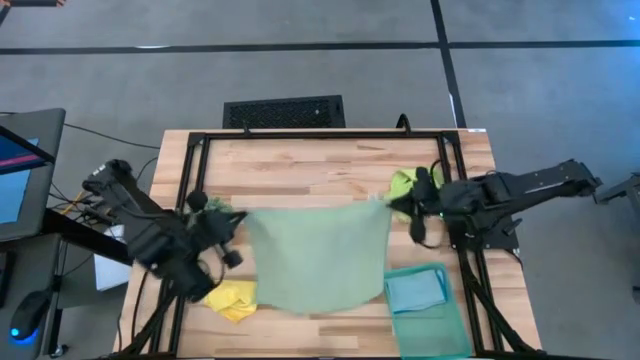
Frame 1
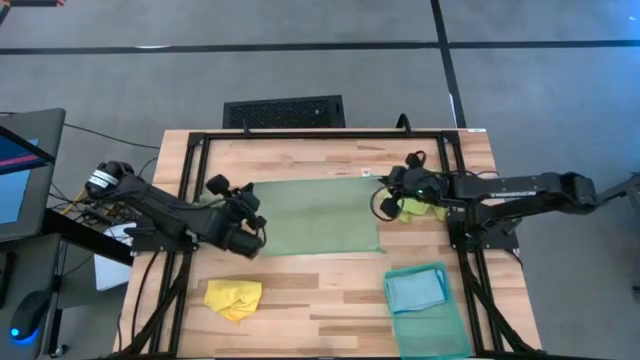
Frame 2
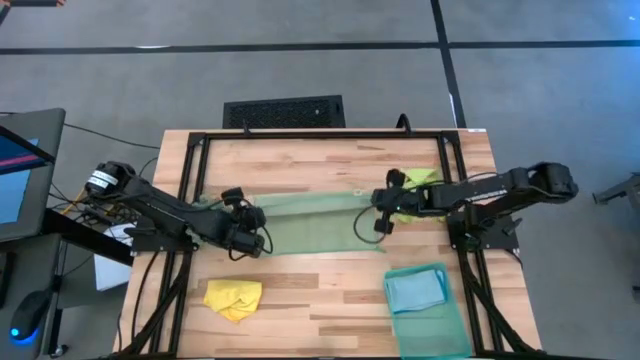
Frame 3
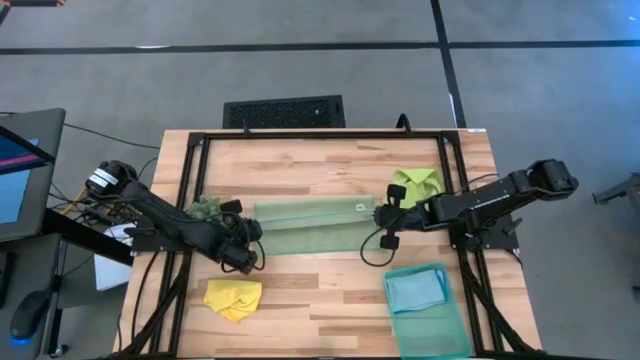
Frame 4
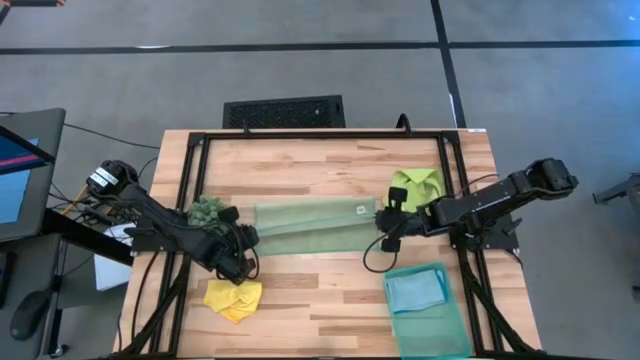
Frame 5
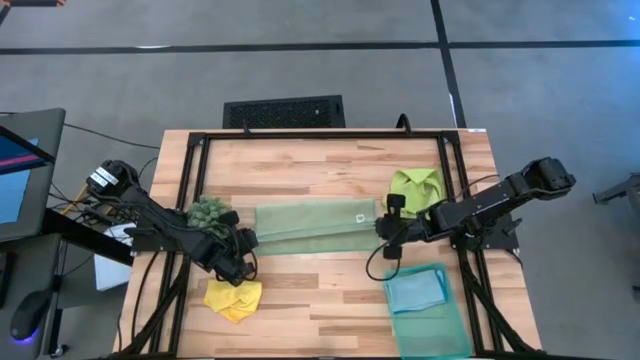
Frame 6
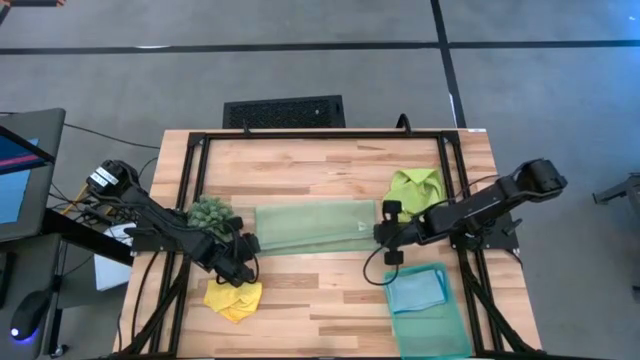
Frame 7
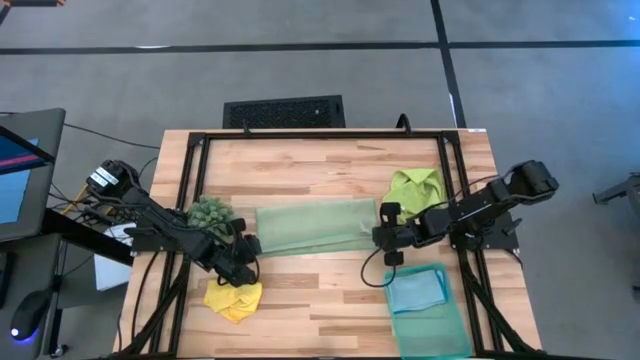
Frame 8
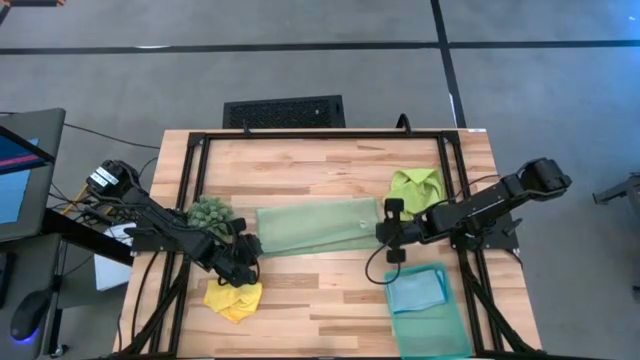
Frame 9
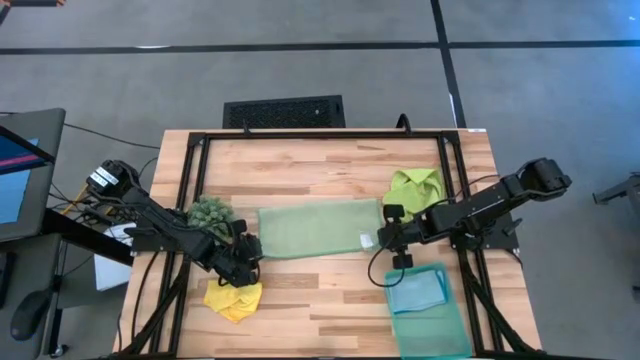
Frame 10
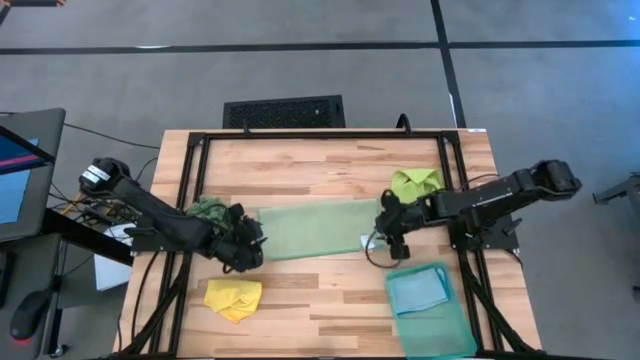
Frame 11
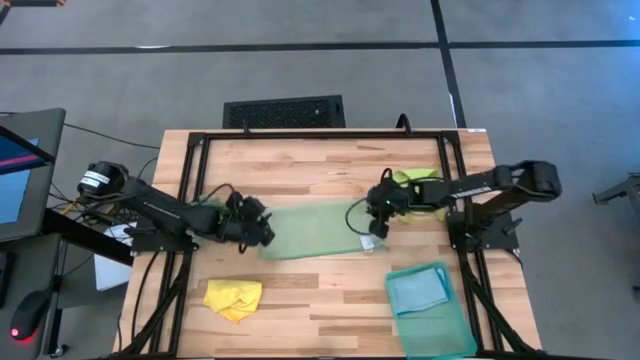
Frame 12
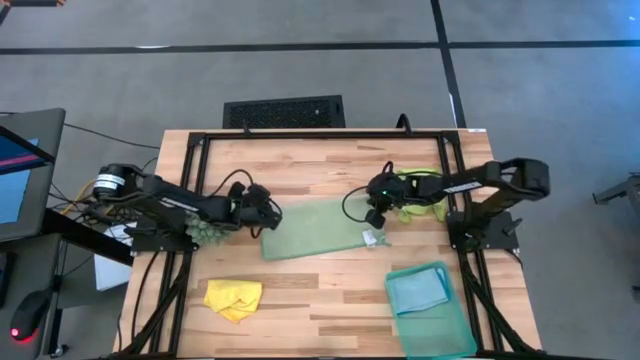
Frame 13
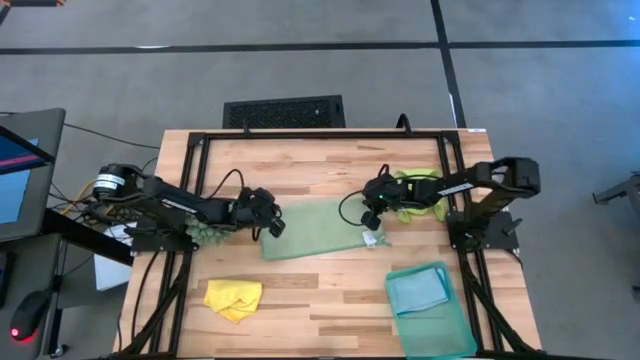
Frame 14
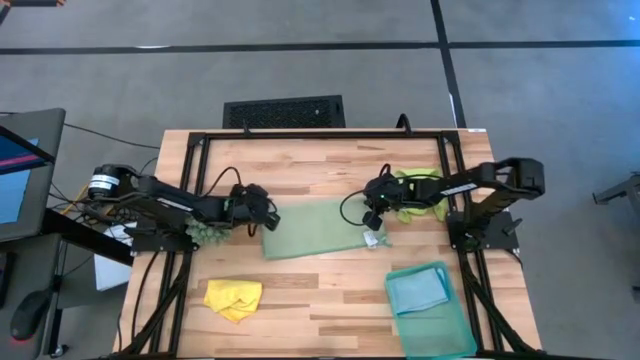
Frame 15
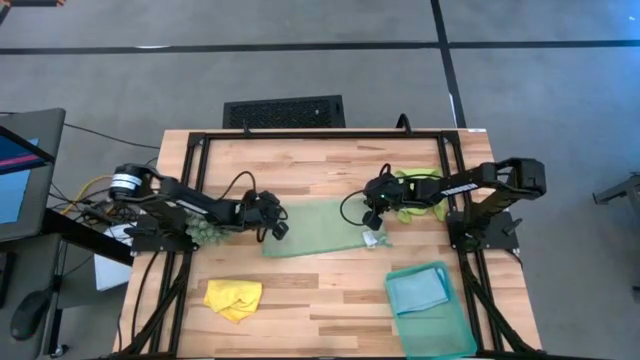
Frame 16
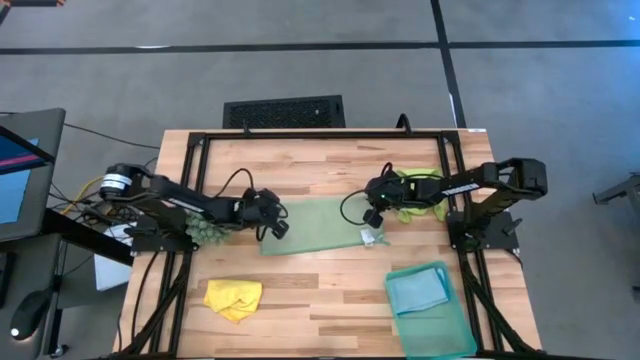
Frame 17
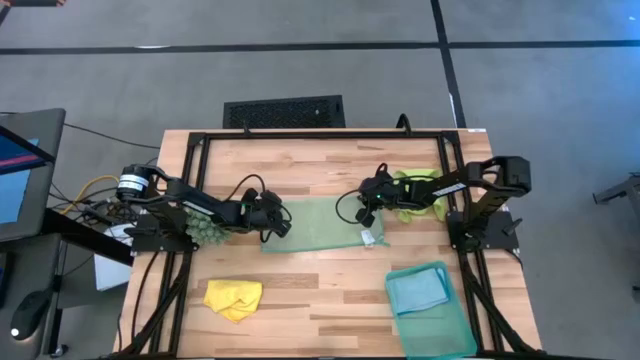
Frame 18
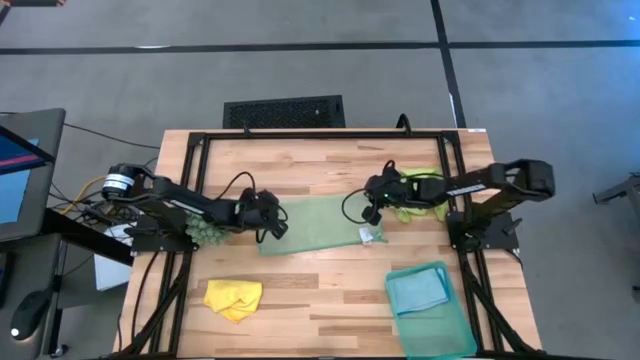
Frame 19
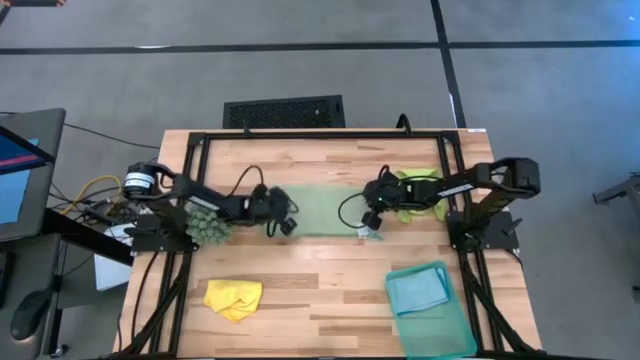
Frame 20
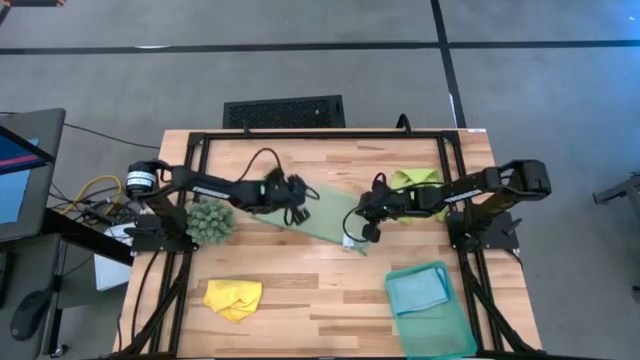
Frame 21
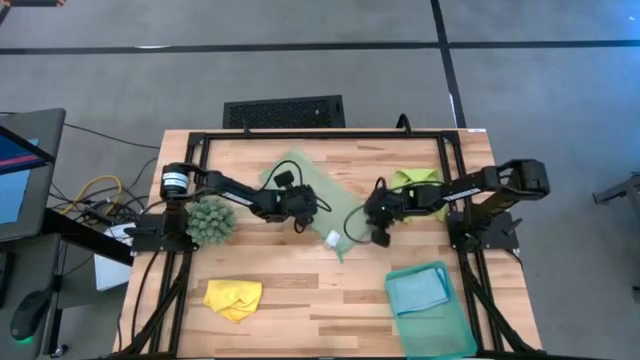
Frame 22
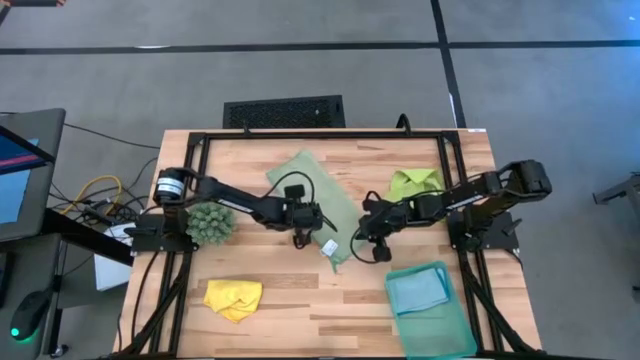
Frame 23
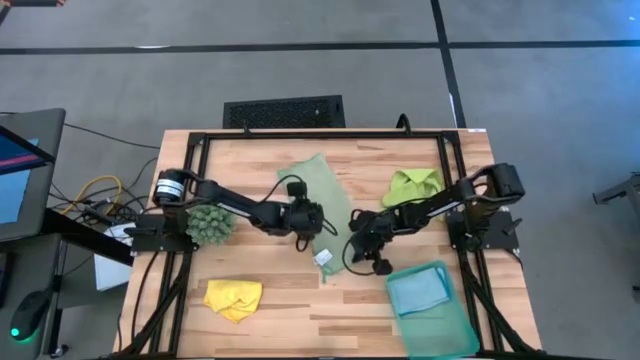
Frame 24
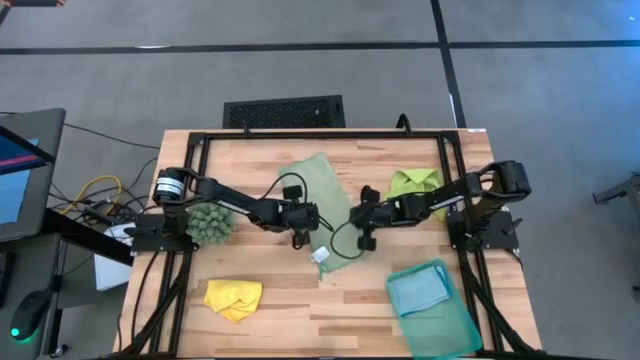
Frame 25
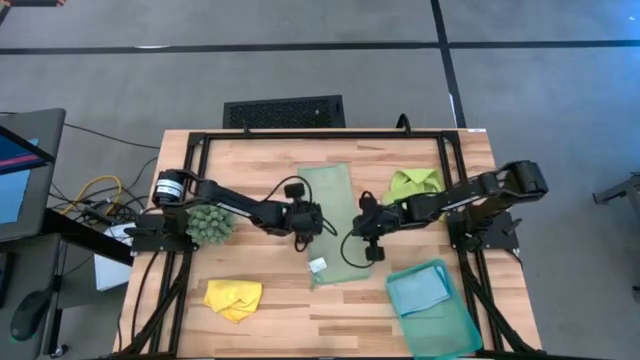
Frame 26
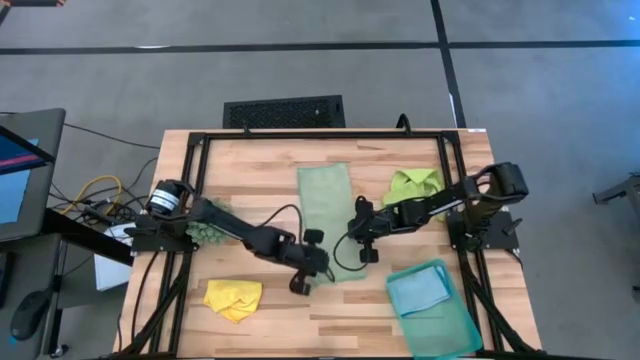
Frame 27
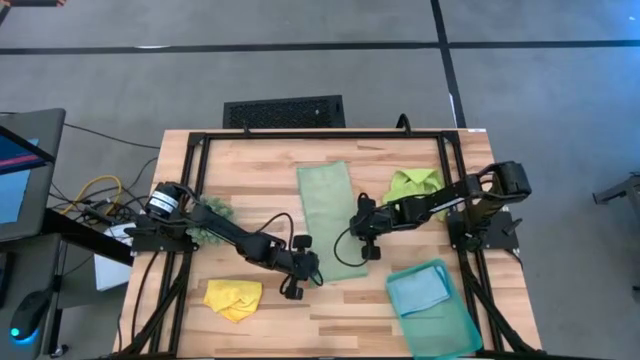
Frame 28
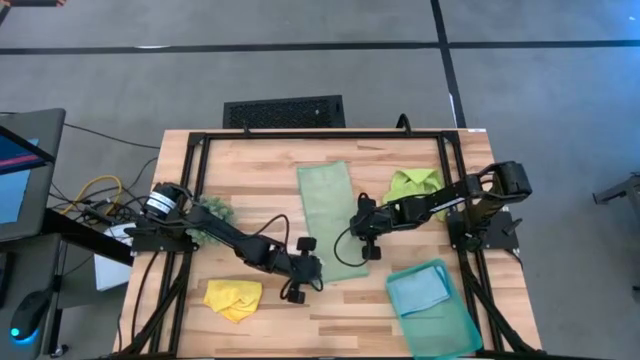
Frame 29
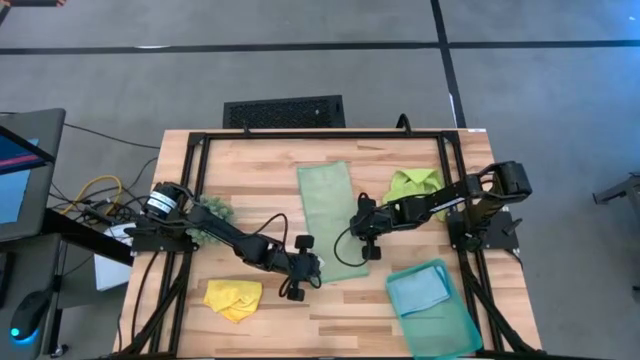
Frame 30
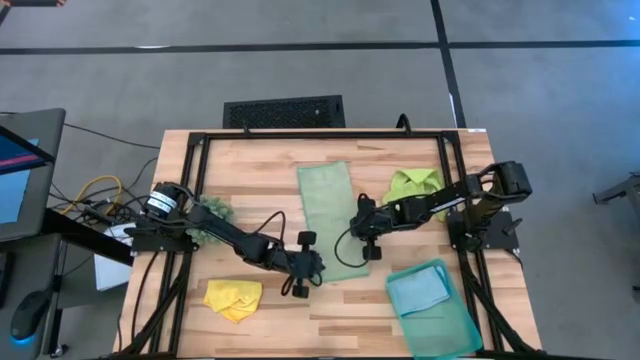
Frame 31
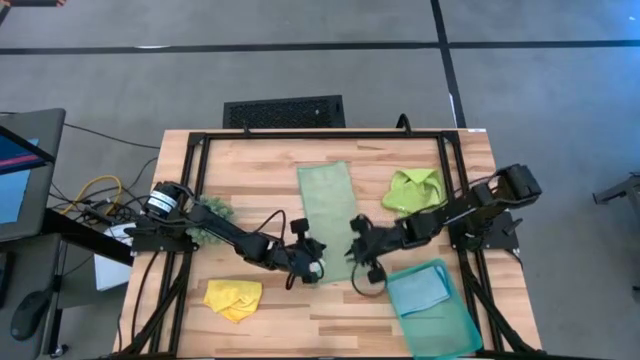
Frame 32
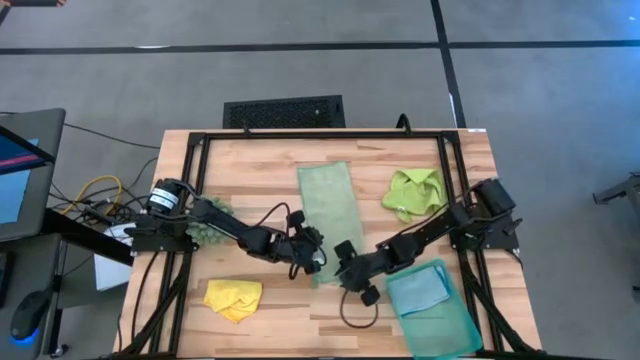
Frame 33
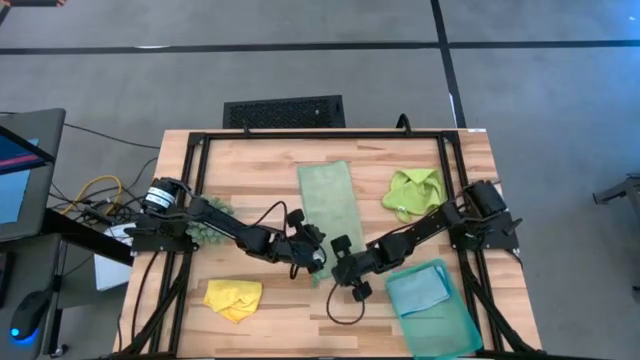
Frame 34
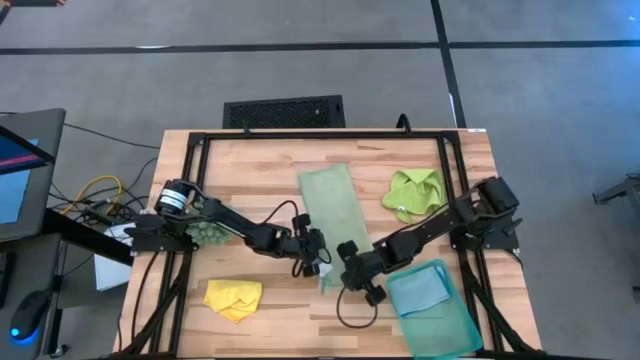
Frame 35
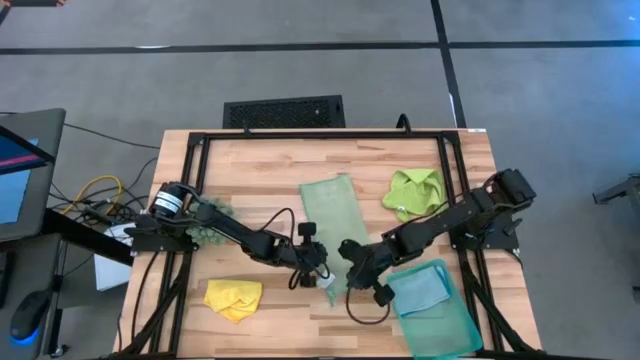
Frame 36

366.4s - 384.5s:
Task: Fold microfiber towels
Fold the green microfiber cloth
